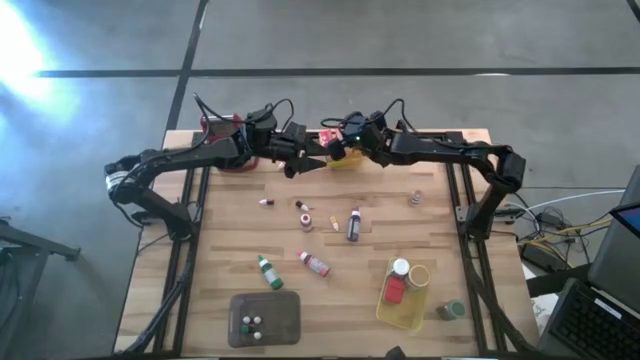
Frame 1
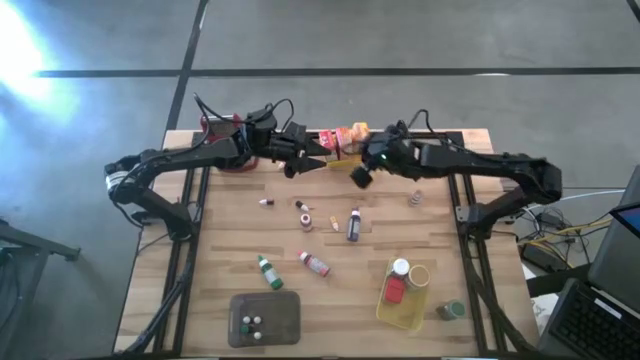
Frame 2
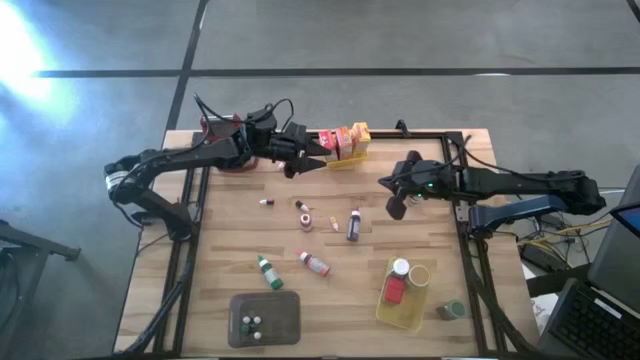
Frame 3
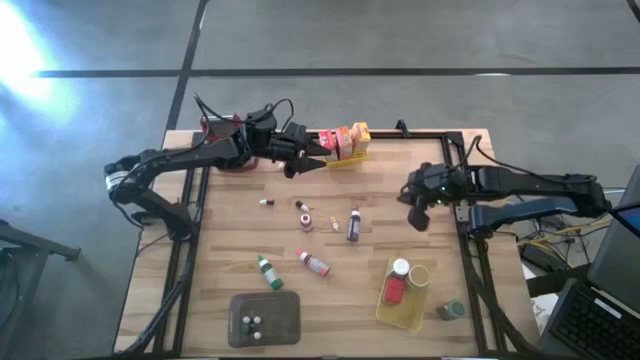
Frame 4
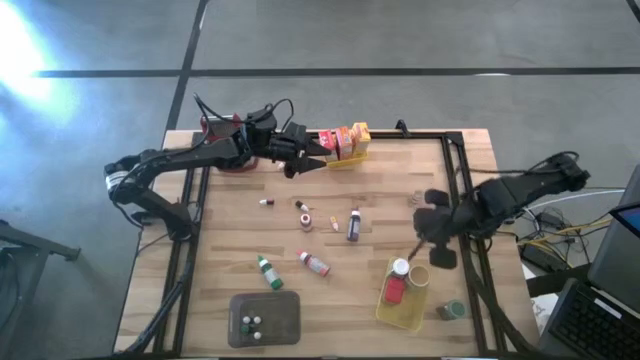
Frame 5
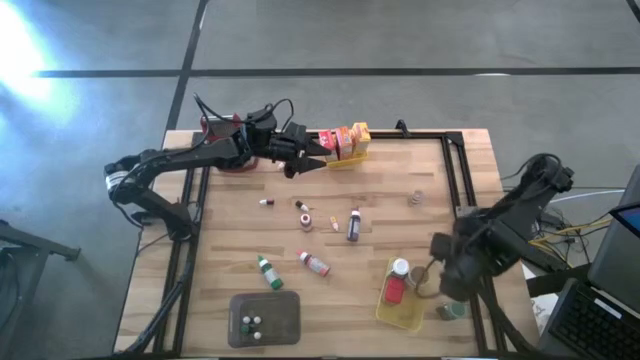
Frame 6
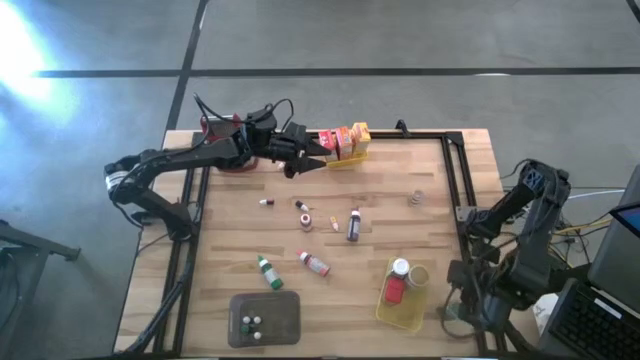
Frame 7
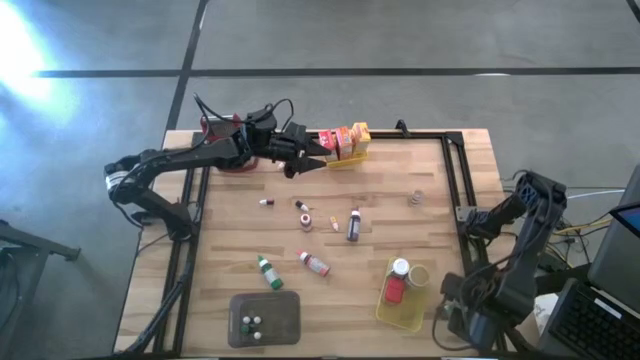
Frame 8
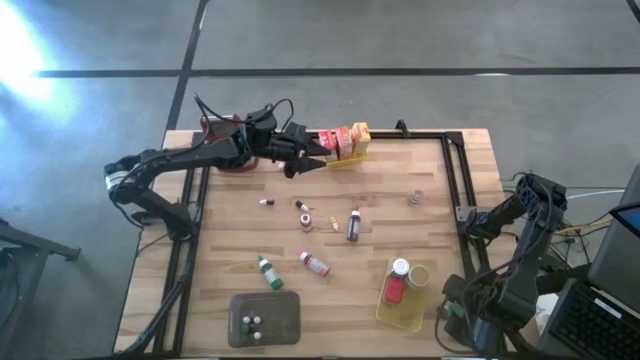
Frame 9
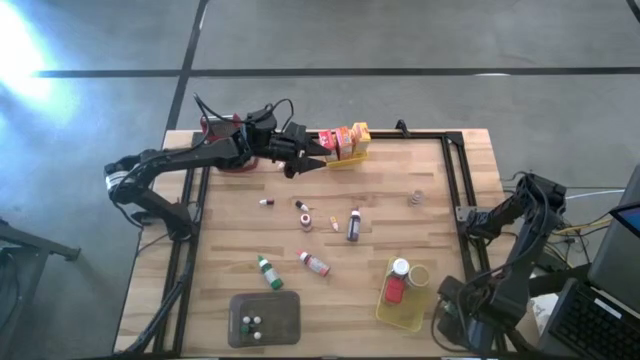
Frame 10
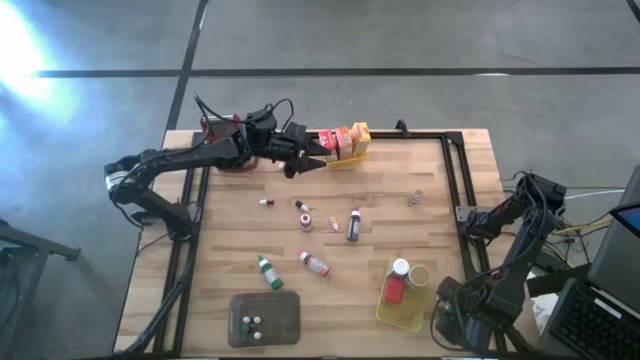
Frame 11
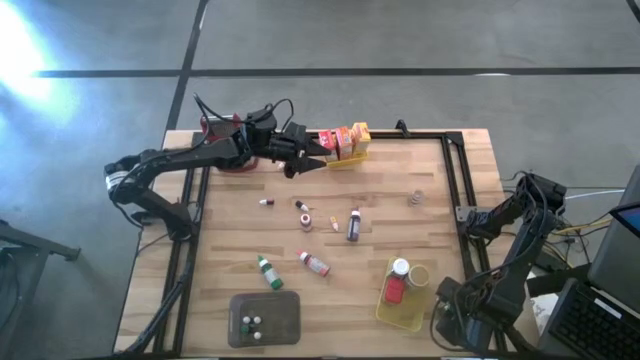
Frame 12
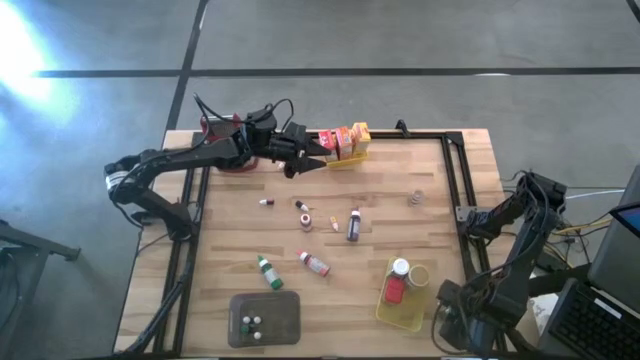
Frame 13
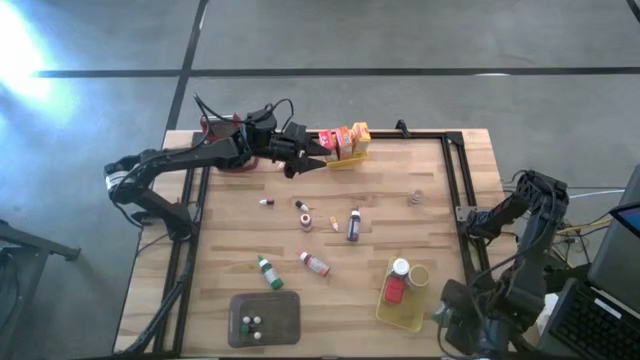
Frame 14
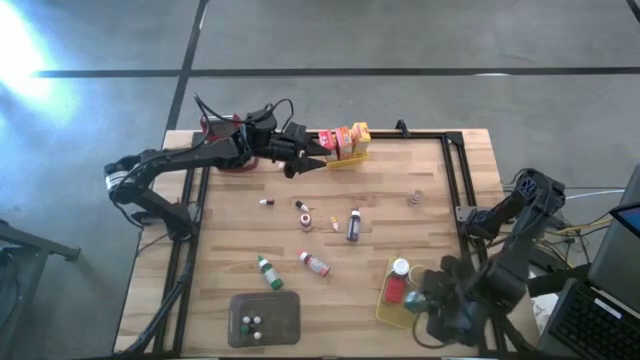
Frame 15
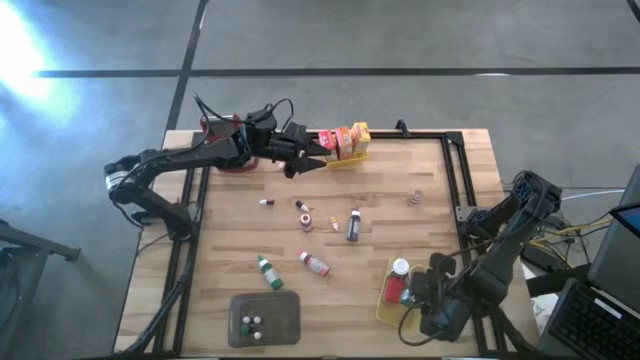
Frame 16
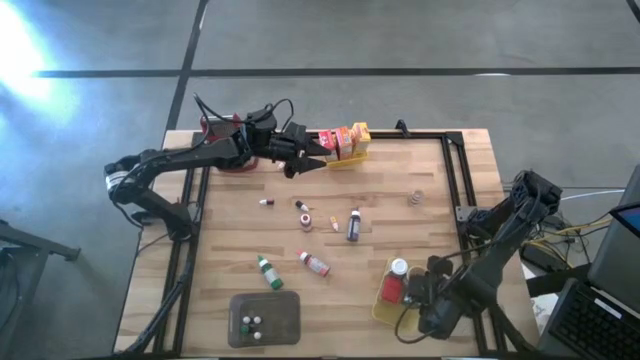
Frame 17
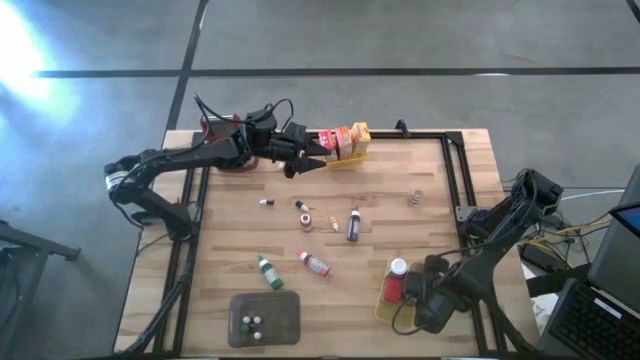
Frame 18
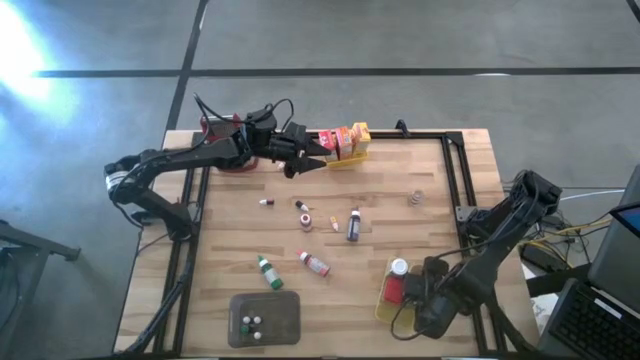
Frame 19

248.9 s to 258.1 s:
Task: Pick & Place Kitchen Items
Put the green seasoning bottle into the bottom yellow bin

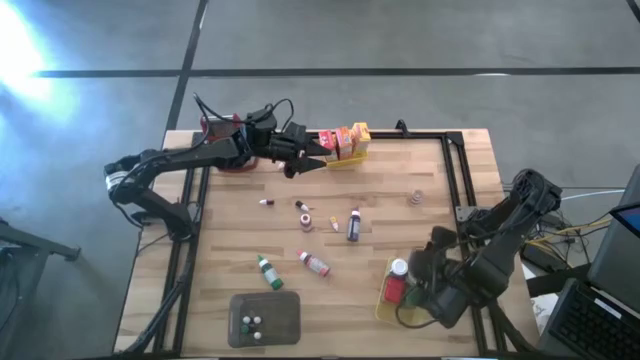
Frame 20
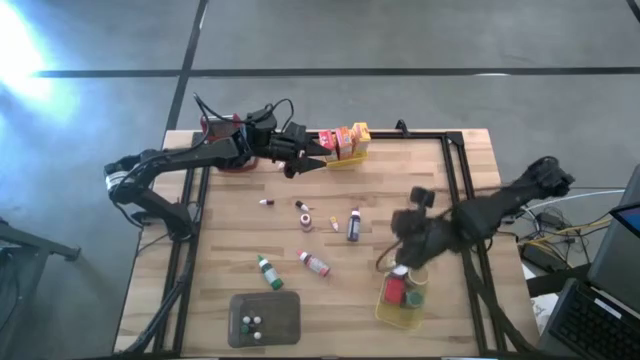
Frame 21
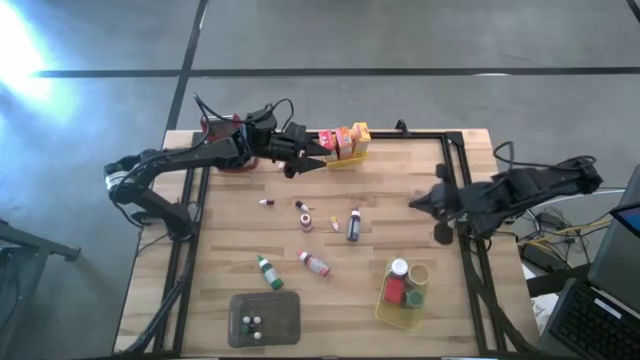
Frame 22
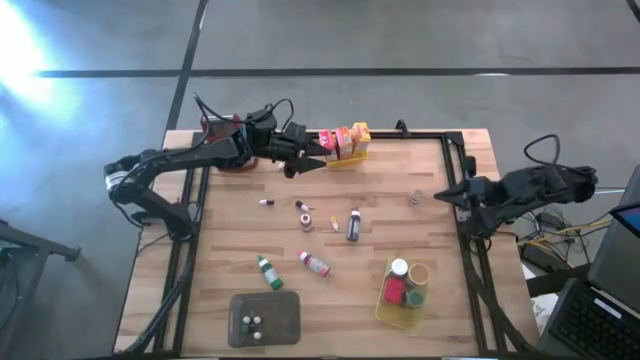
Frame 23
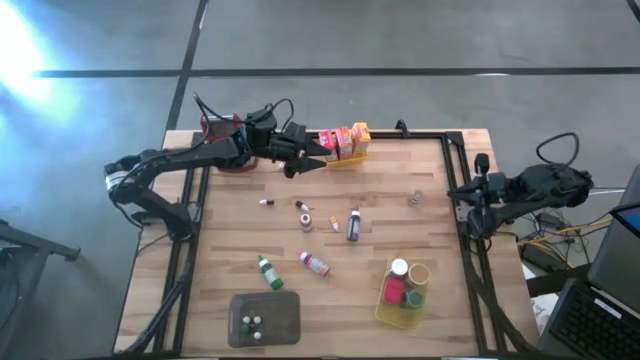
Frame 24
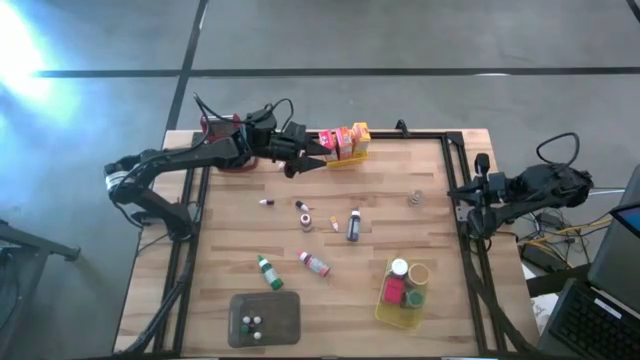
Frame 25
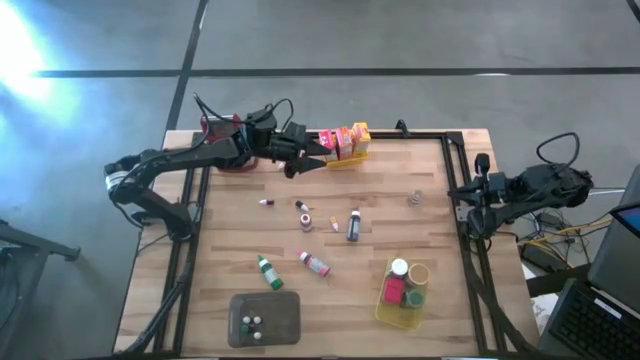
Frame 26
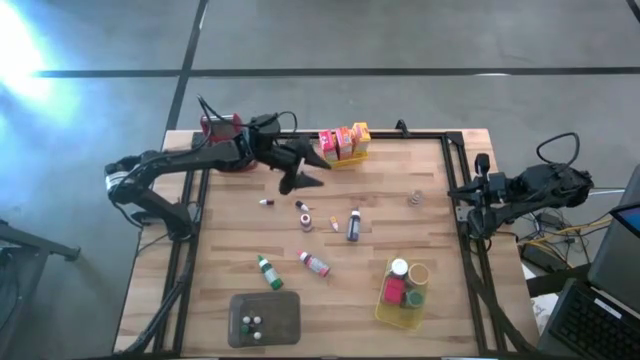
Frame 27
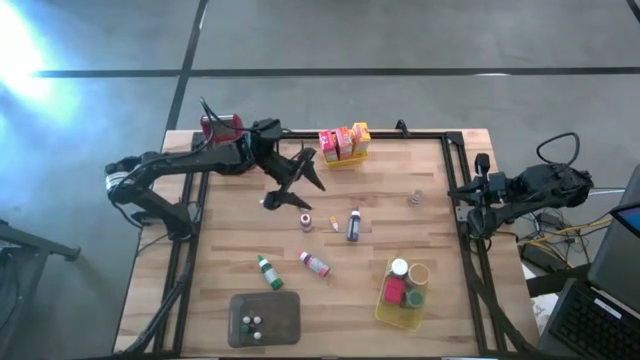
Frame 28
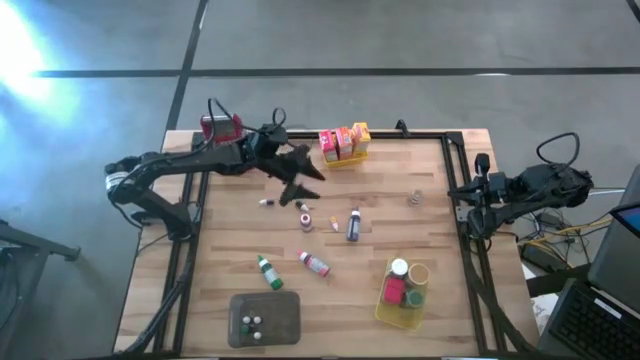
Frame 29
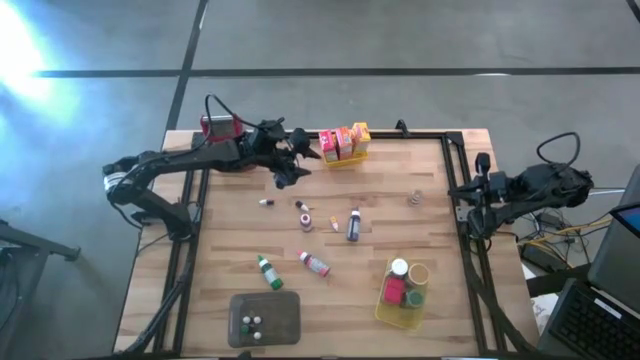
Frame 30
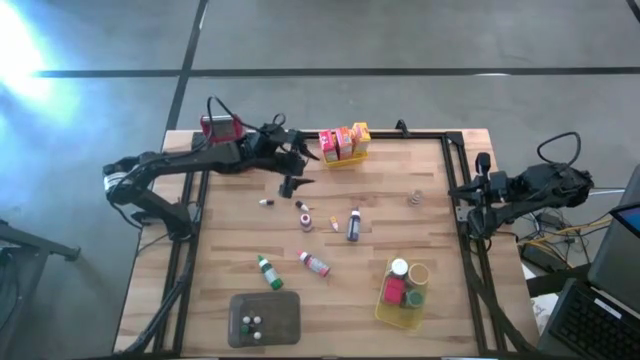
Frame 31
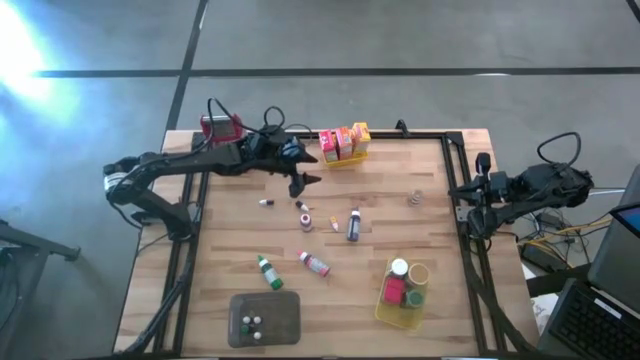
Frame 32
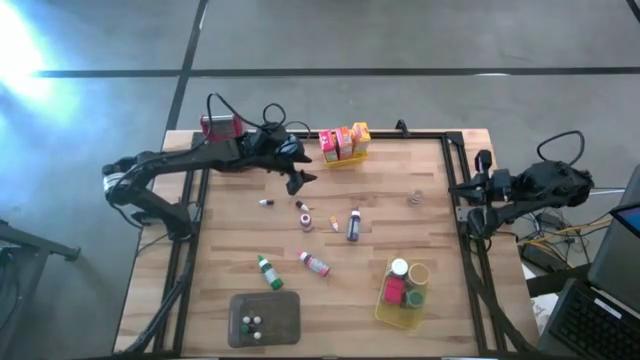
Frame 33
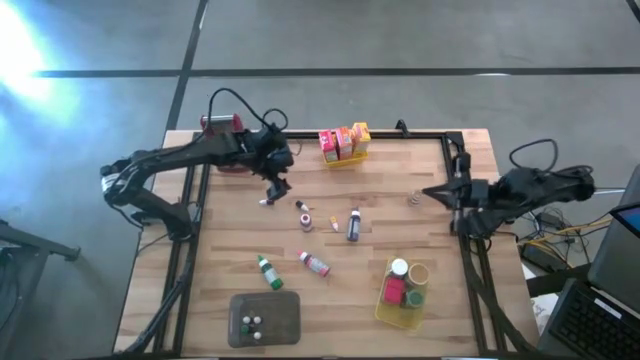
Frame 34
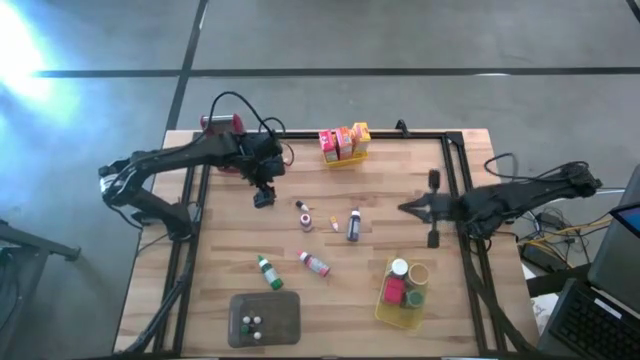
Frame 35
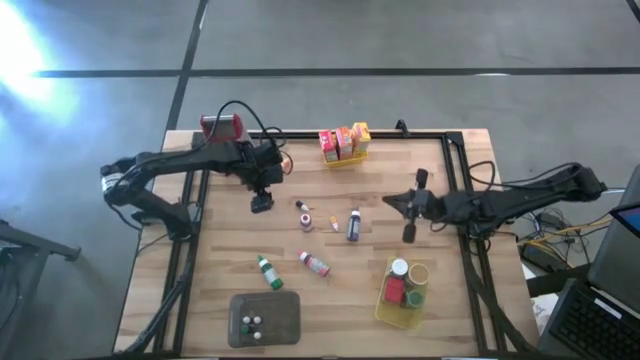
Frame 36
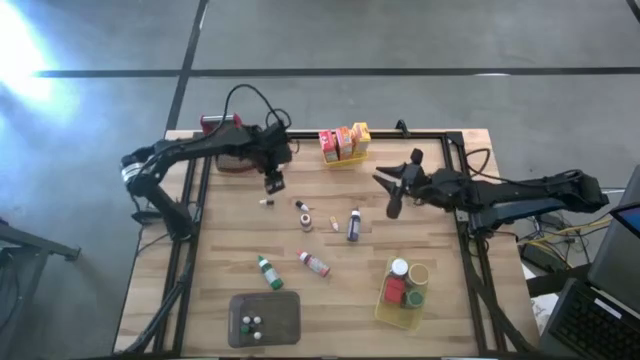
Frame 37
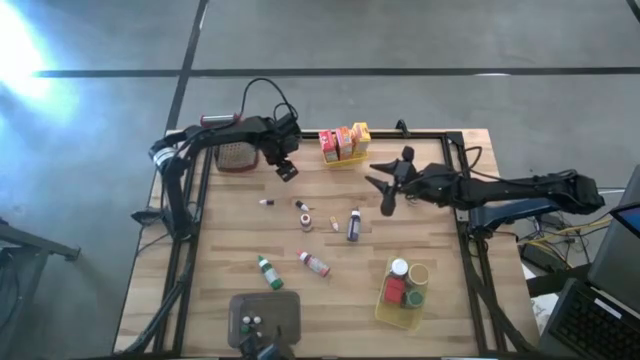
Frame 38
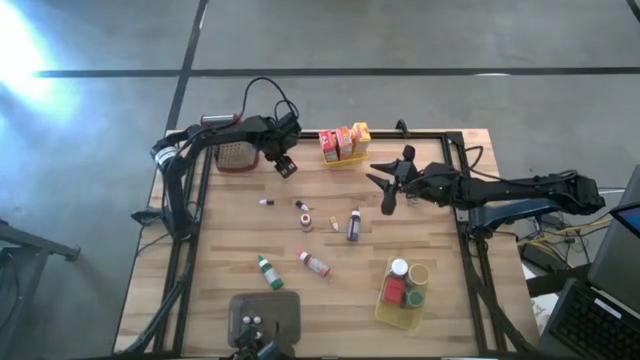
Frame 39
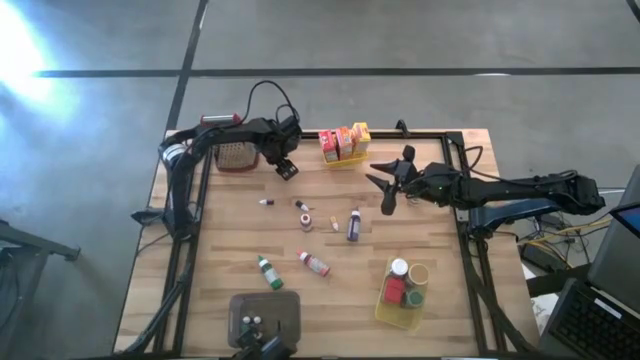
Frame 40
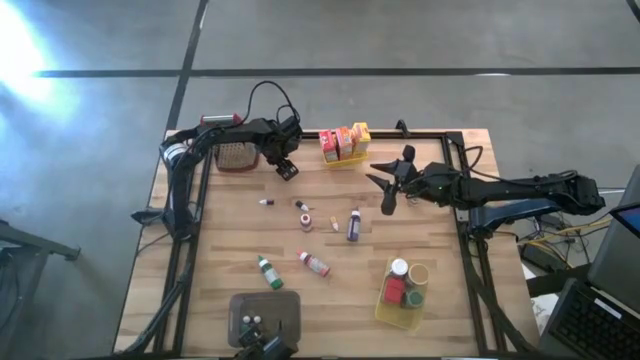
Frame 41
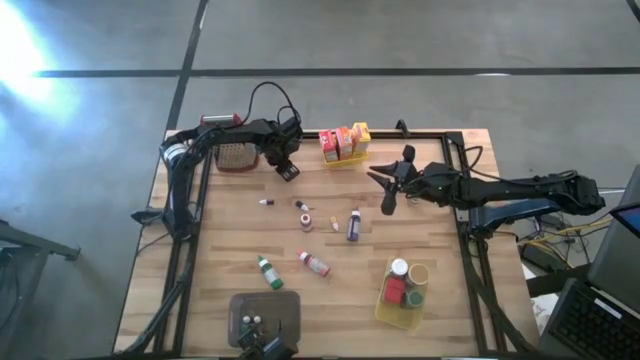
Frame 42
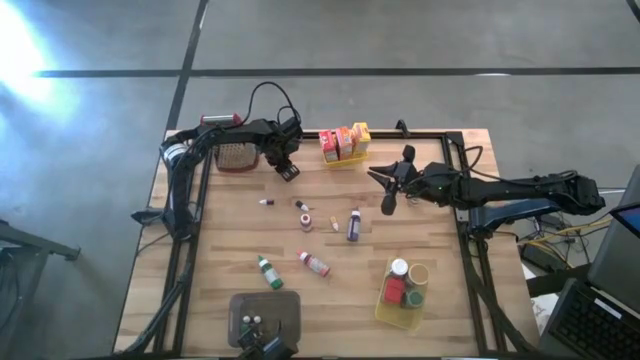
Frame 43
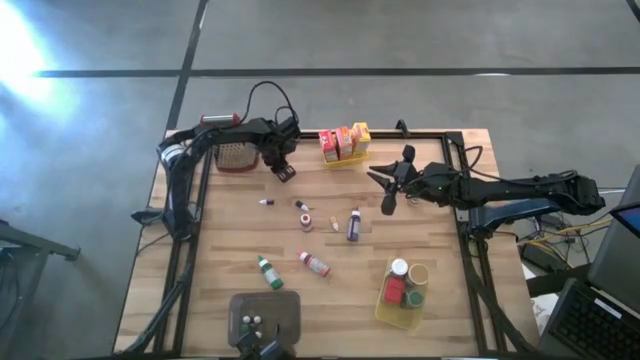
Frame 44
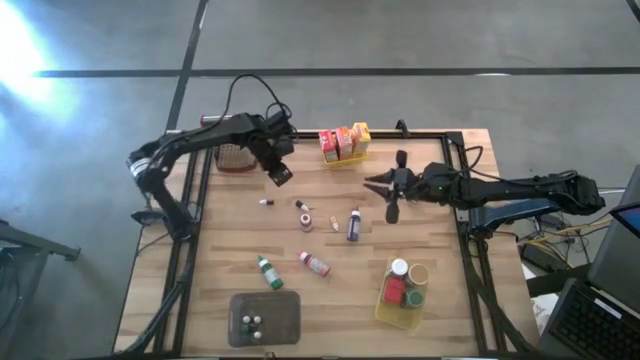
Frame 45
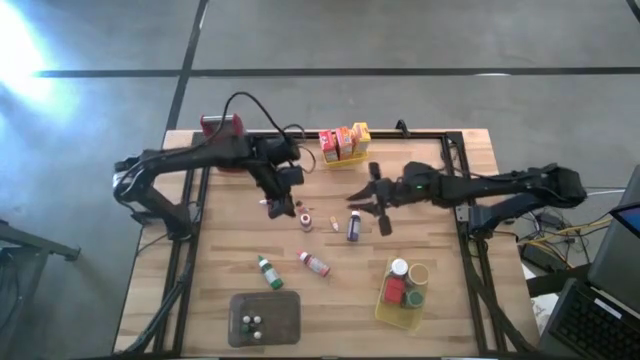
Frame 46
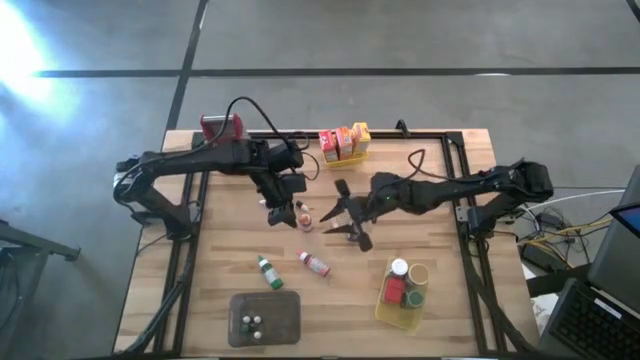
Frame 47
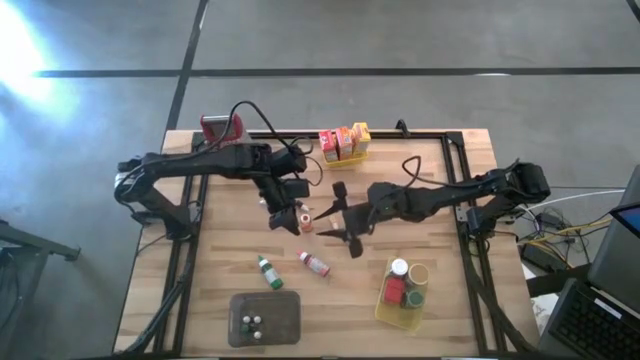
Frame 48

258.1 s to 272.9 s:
Put the top orange food coloring bottle into the black bin
